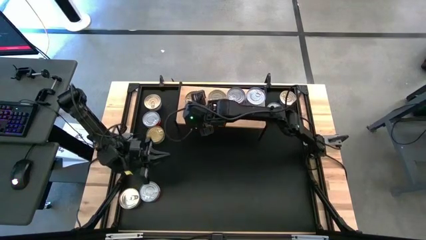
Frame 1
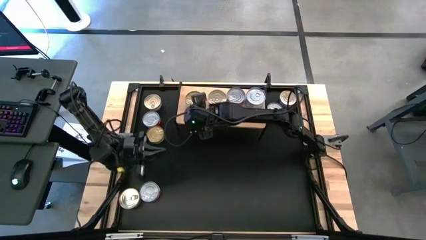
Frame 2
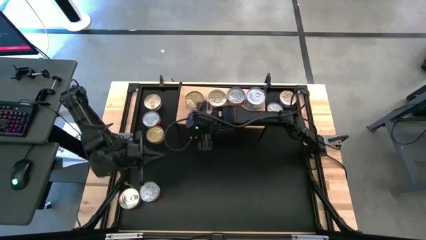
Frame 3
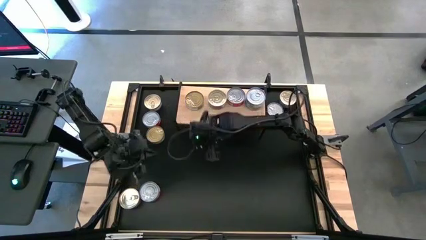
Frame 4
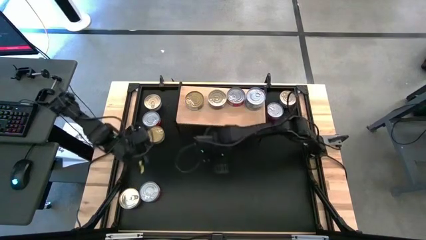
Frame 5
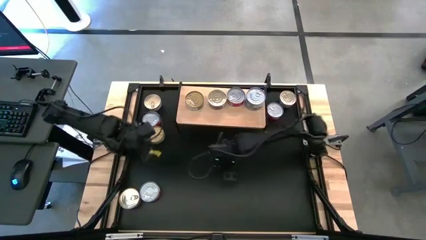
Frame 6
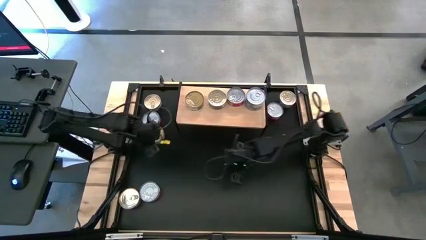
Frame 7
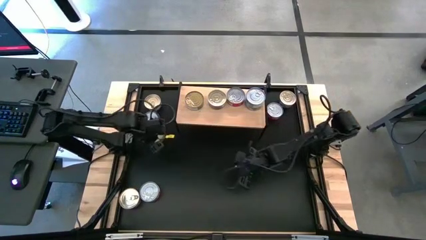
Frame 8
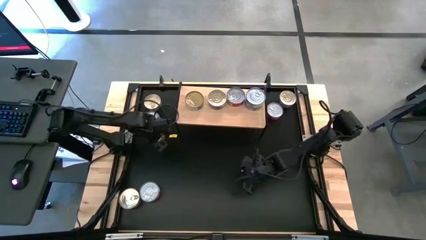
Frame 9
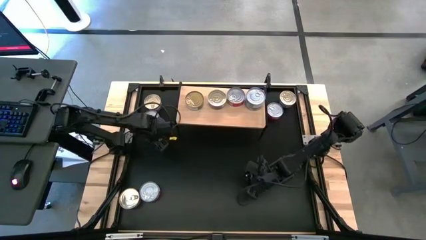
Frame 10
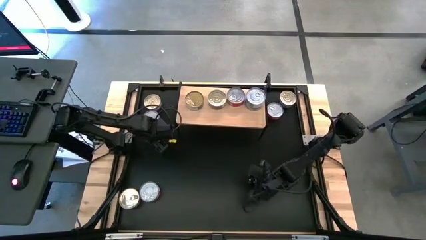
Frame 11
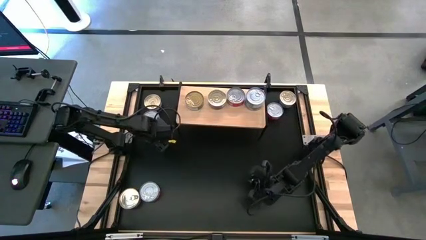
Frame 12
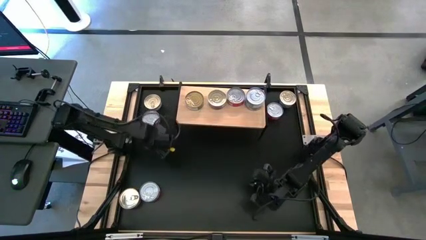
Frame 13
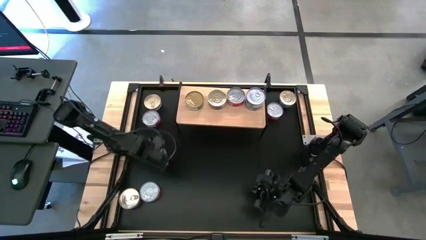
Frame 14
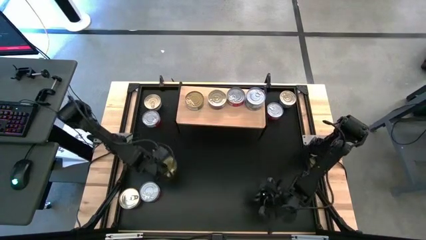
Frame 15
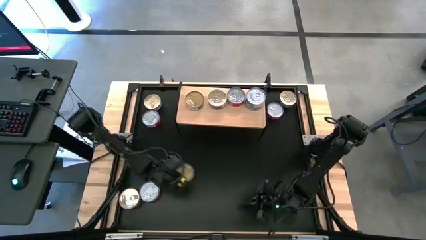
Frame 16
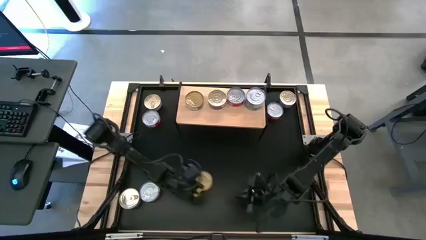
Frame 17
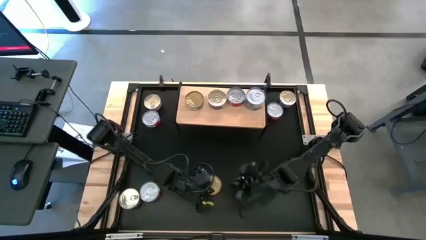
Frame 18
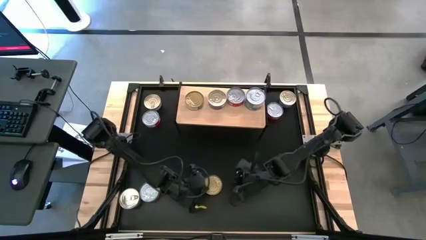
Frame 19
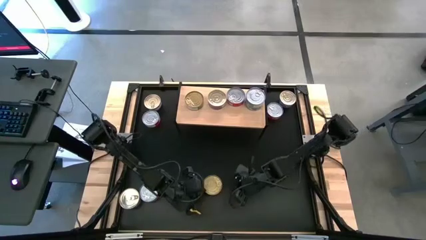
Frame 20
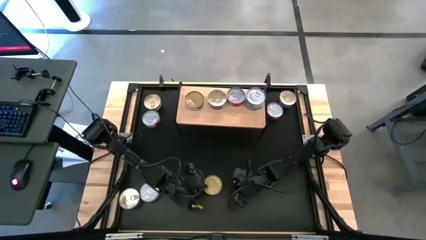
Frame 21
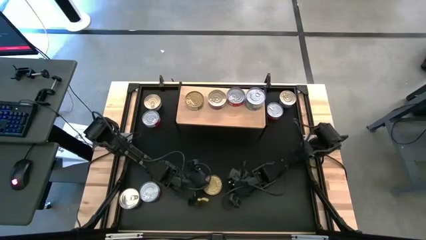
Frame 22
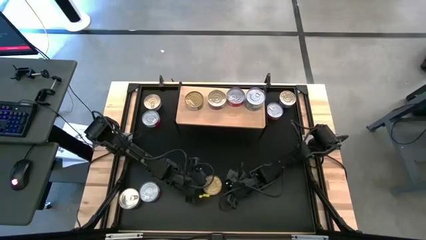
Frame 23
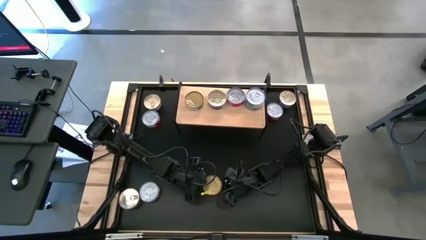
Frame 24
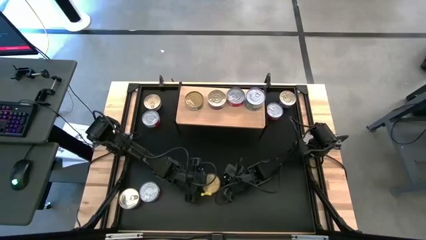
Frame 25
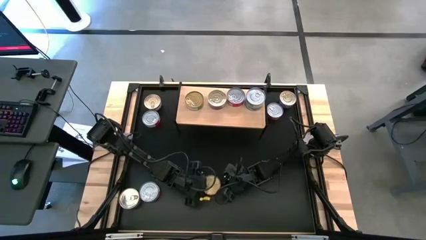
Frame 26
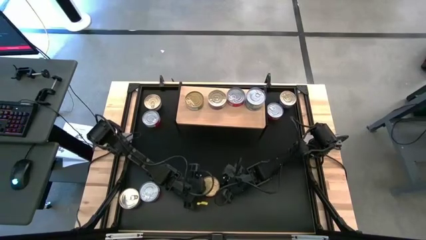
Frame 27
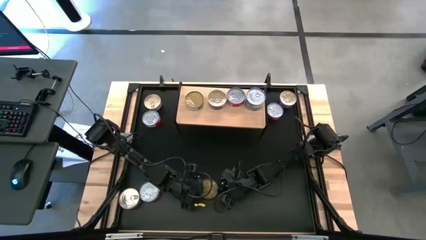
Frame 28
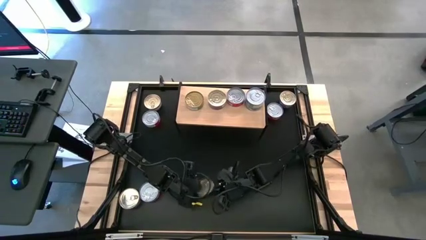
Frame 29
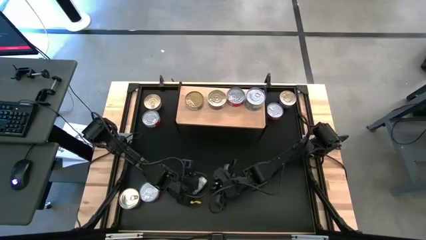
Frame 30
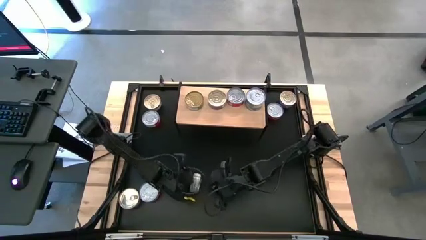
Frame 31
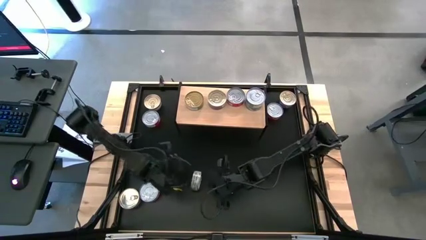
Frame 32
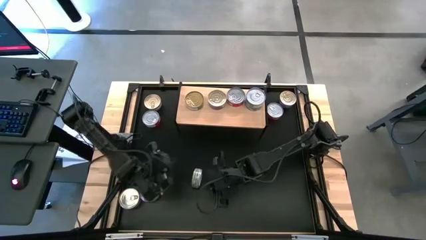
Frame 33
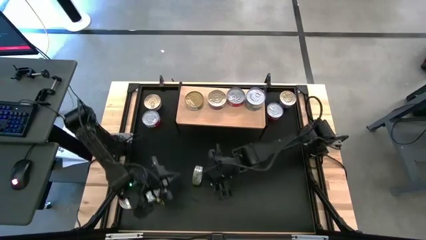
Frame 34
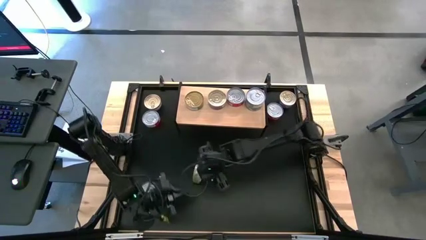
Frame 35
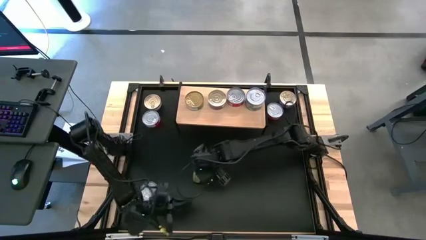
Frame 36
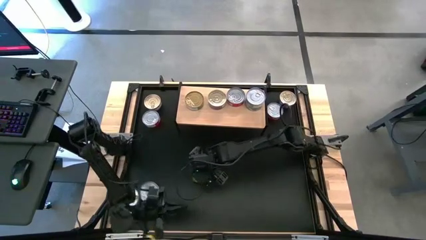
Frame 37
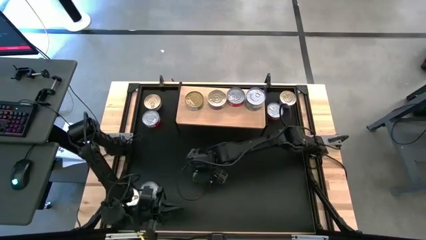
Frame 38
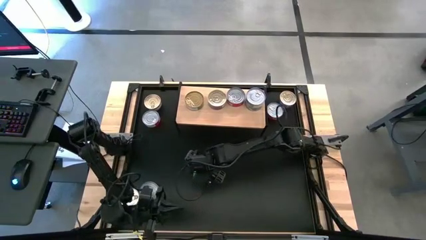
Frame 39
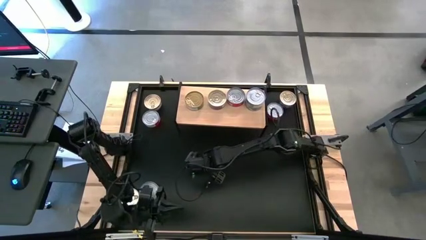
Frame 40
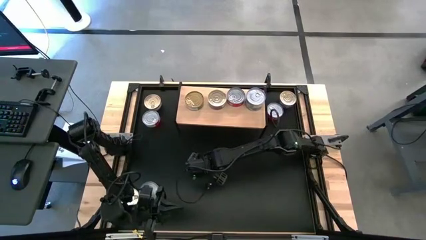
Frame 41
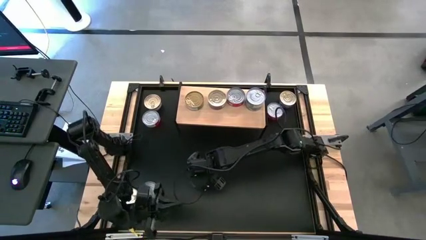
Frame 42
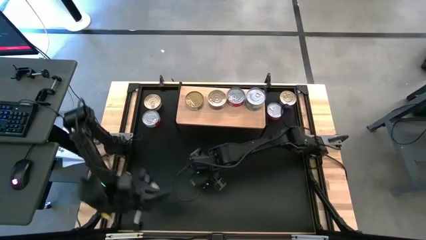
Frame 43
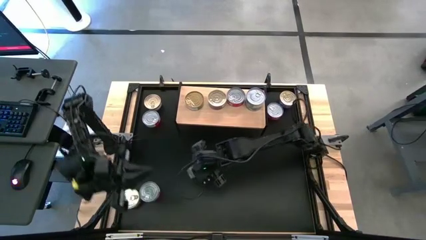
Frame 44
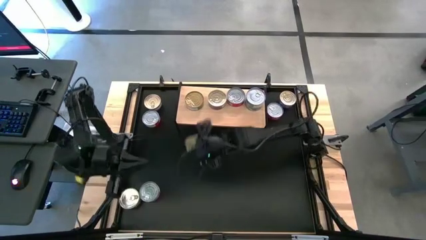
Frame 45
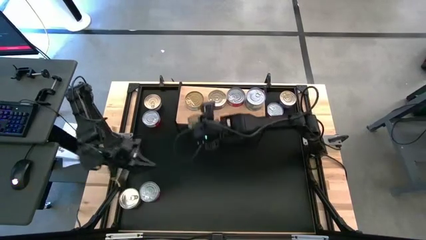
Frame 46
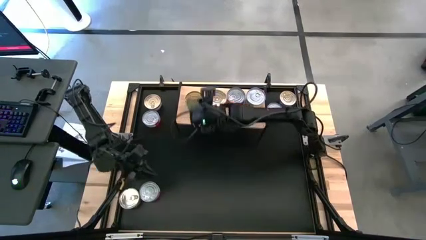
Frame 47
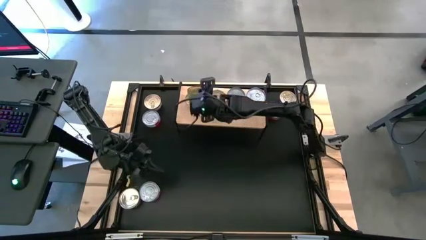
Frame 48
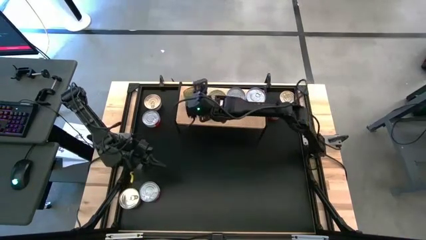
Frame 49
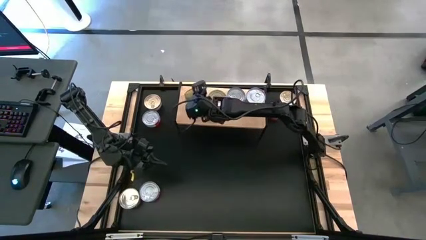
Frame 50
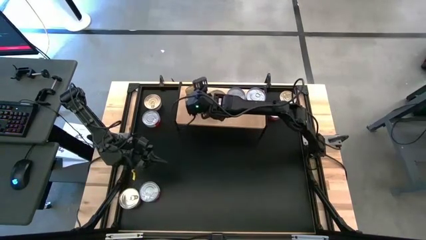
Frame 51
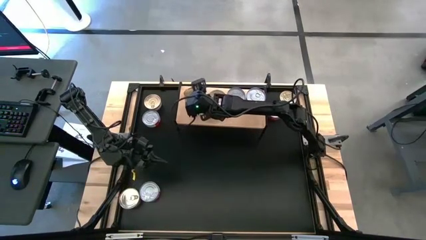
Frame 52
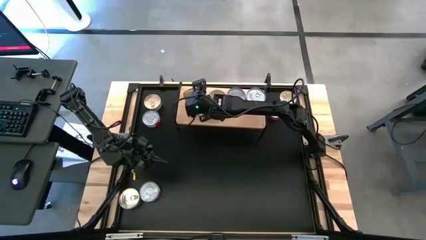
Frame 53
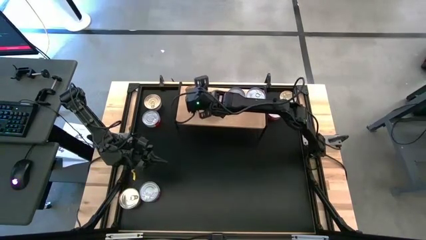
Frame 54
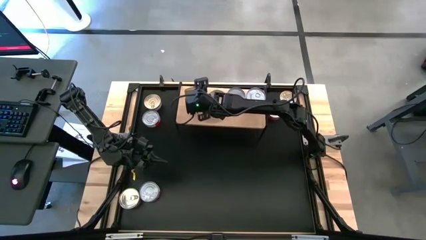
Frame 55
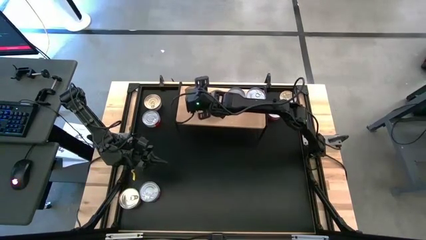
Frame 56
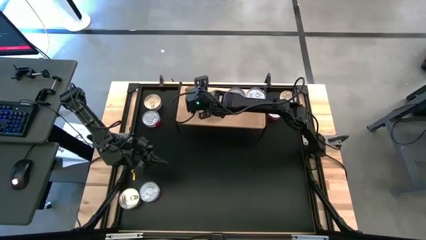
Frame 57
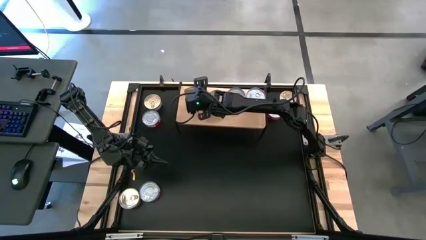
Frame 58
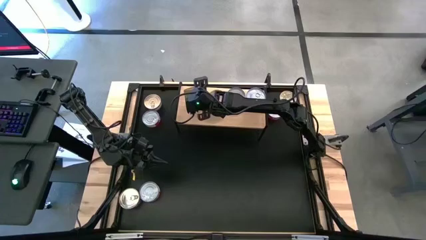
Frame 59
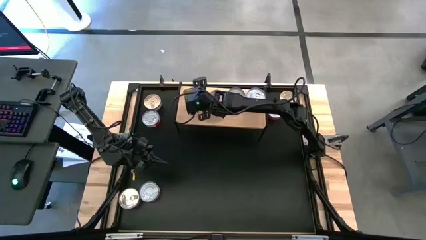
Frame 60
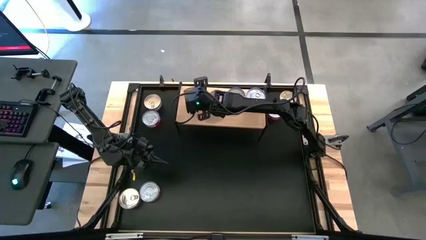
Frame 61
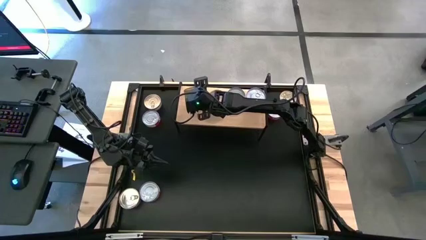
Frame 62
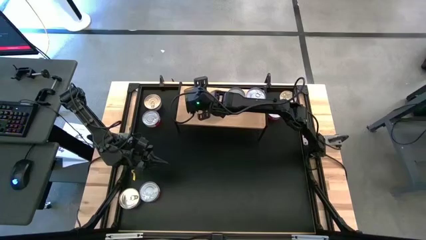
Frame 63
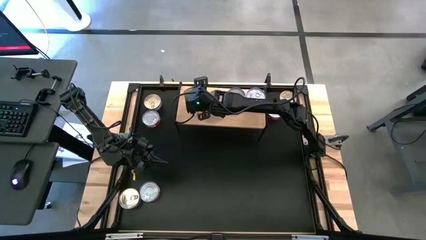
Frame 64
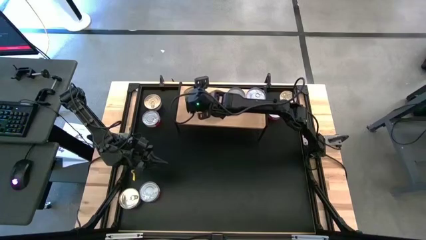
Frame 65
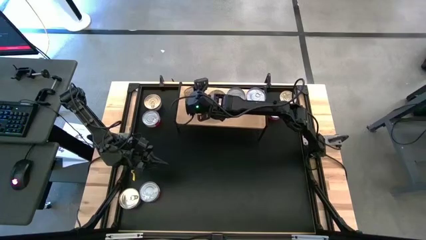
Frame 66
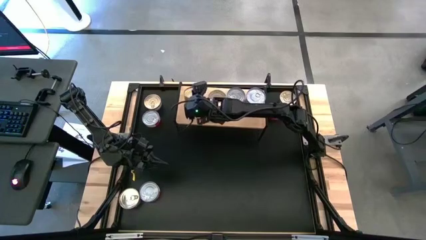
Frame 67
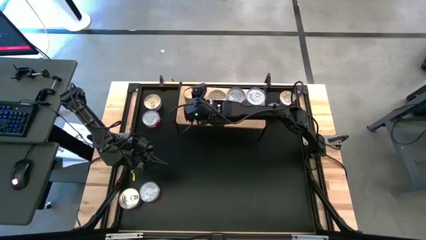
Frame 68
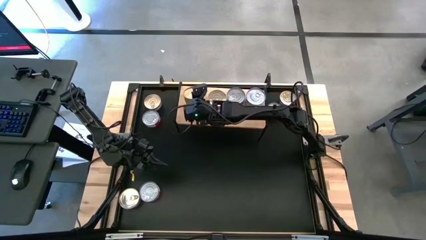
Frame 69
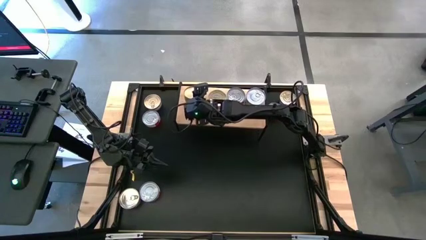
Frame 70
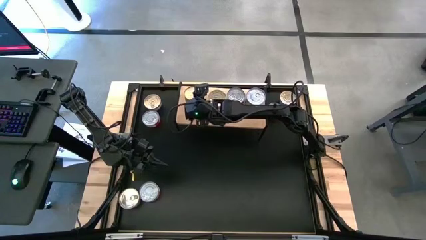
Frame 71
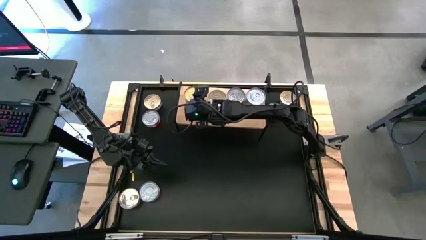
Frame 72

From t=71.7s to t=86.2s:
Task: Stack canned seafood by type on shelf
Stack the green tuna can on top of the green tuna can on the shelf
